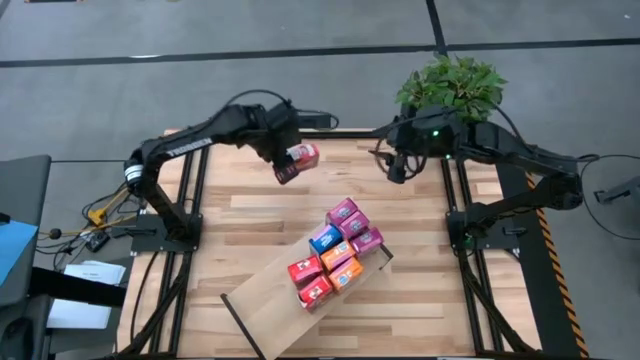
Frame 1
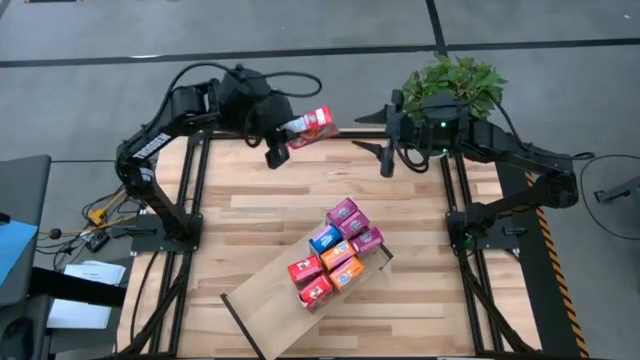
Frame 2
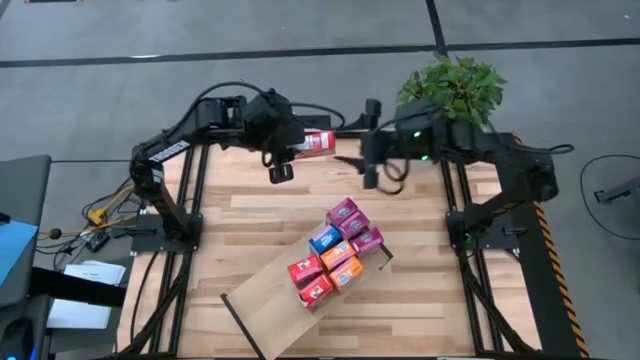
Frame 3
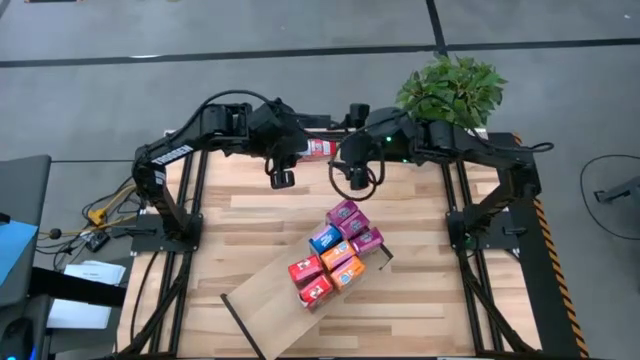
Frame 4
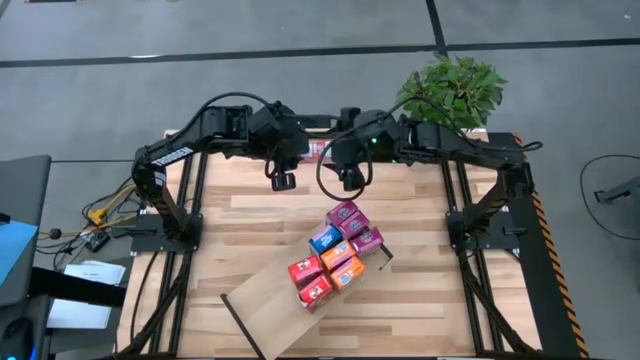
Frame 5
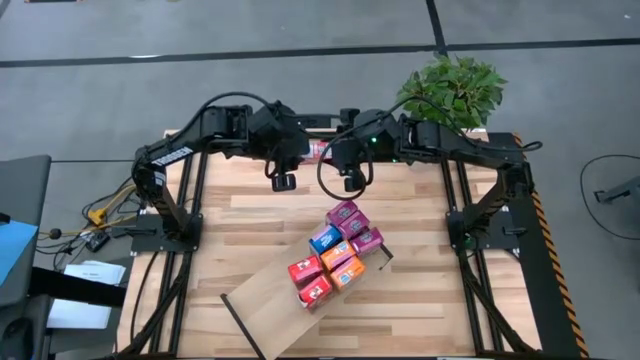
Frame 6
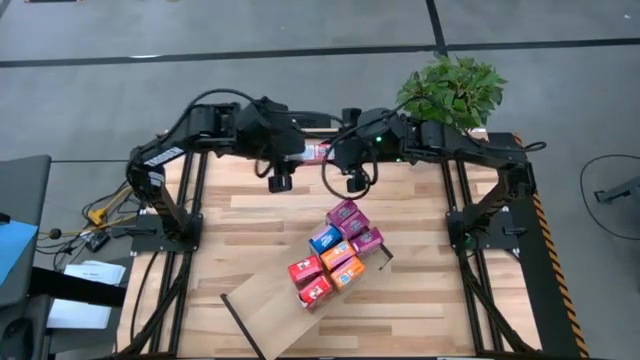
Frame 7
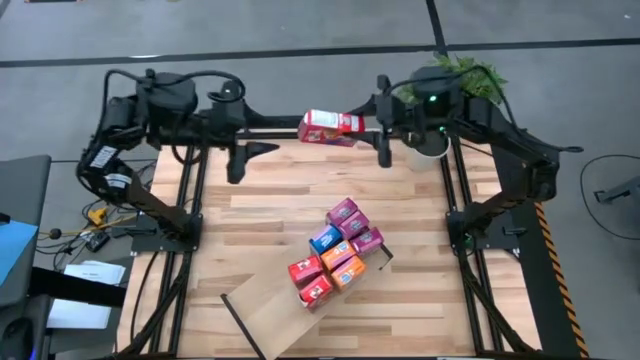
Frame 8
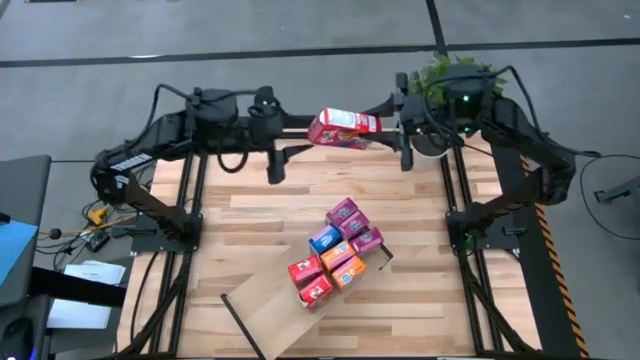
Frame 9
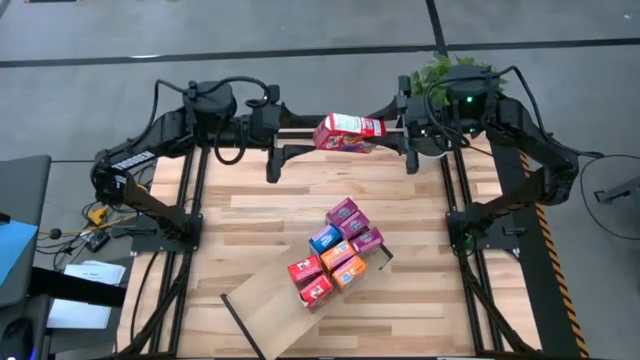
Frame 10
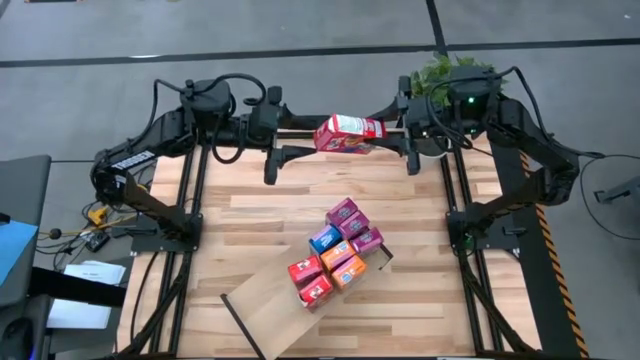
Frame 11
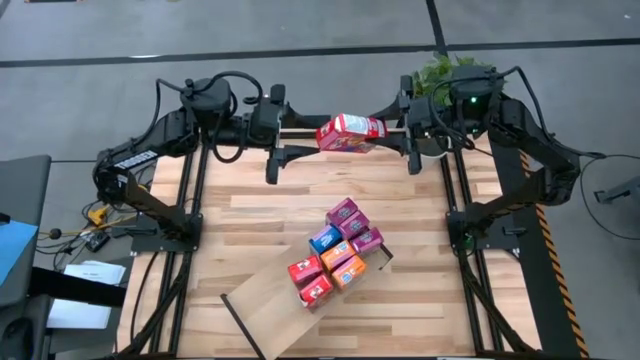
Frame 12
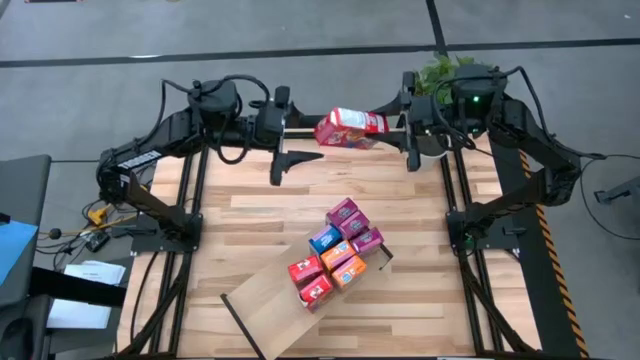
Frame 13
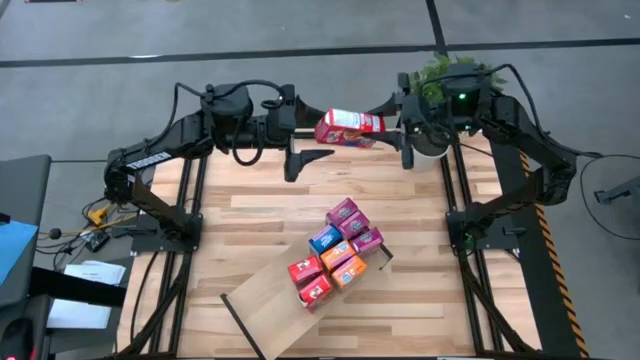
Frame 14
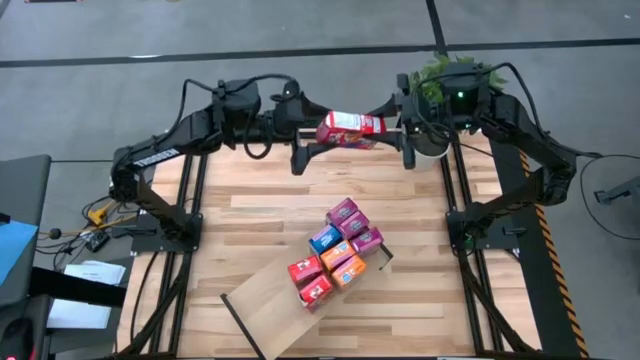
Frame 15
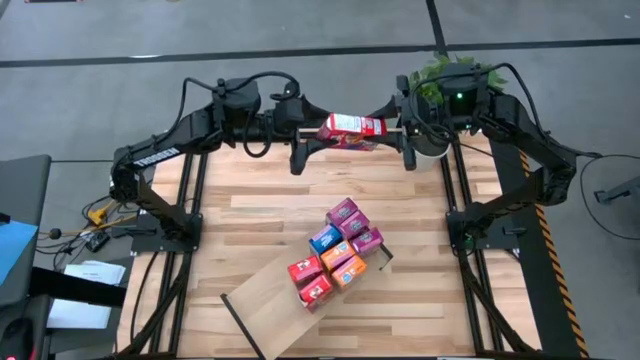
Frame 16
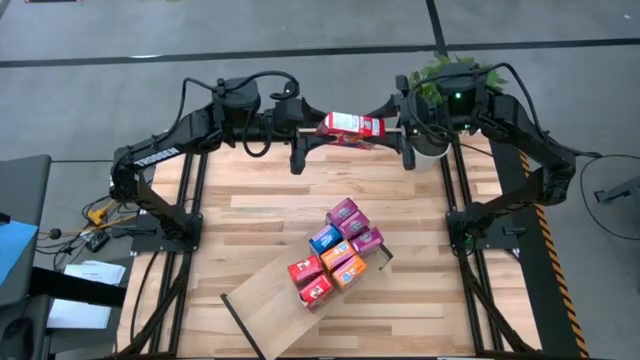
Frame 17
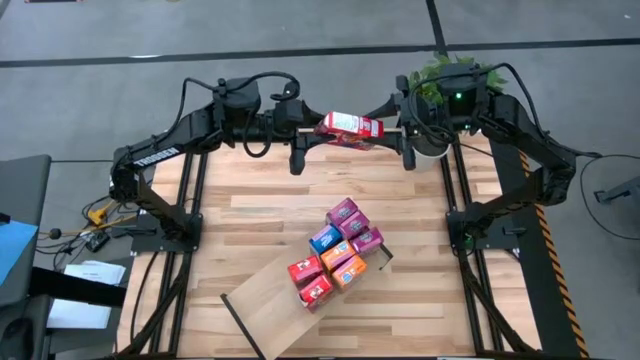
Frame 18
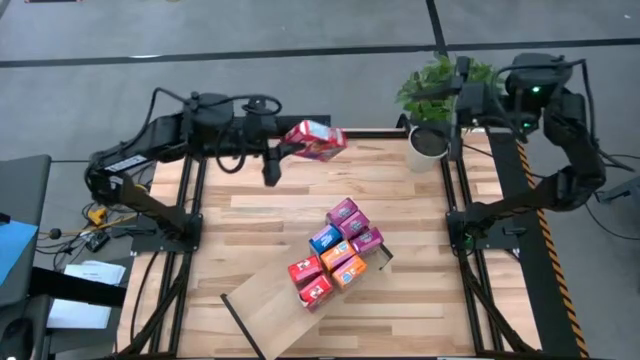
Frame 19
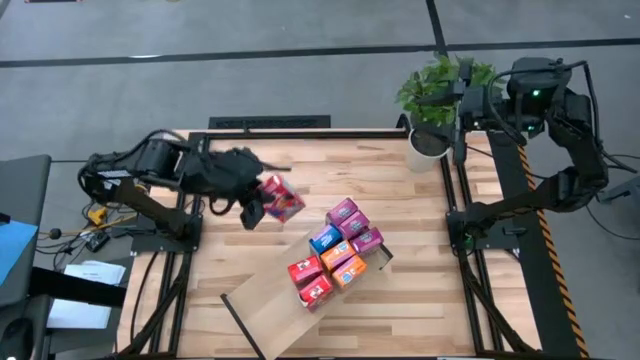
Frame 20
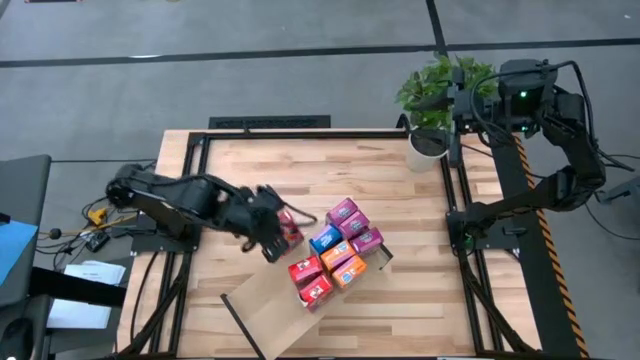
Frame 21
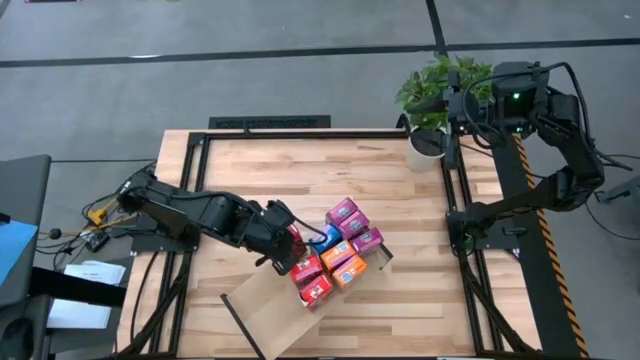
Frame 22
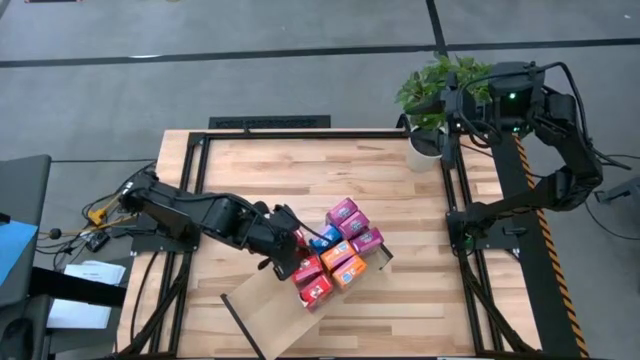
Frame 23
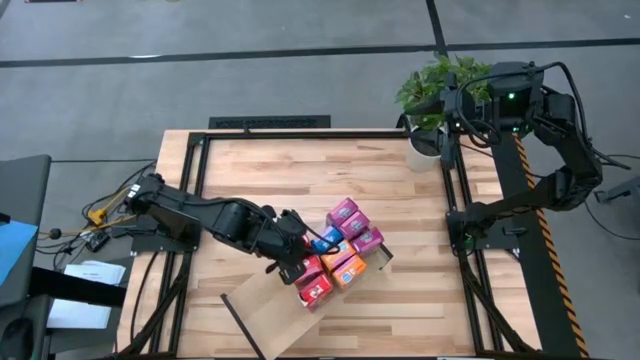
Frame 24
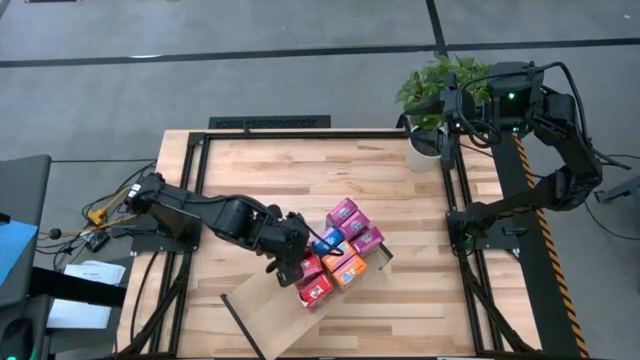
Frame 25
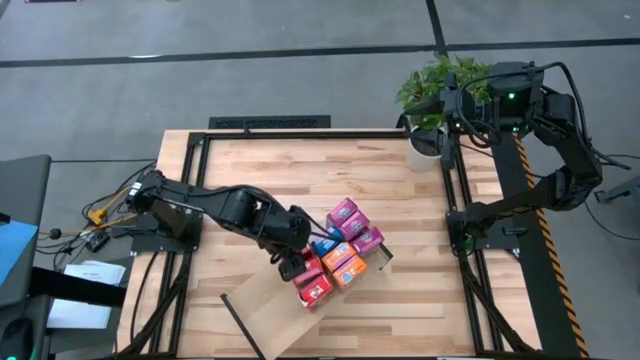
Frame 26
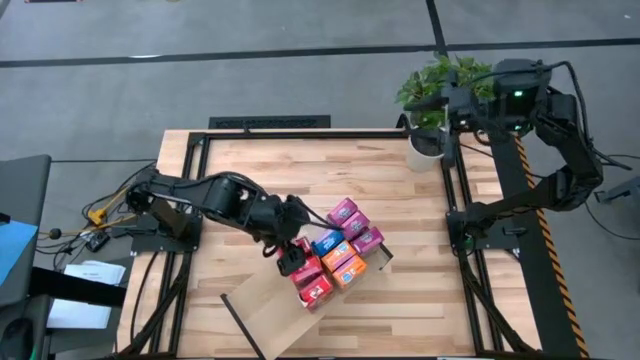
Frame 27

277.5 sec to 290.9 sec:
Task: Stack cereal on shelf
Put the red cereal box onto the shelf

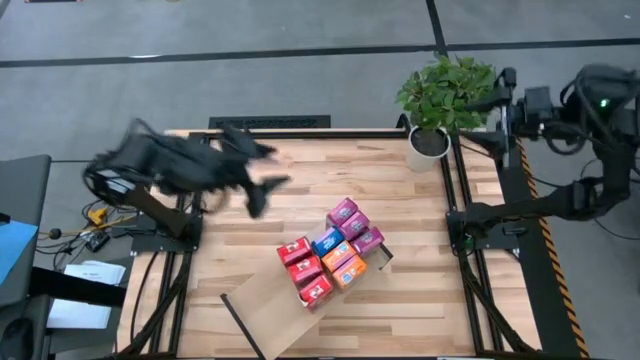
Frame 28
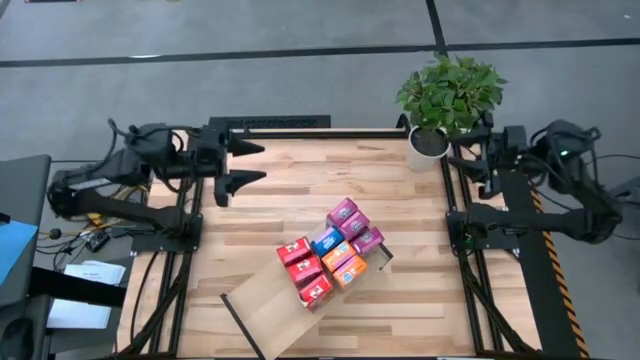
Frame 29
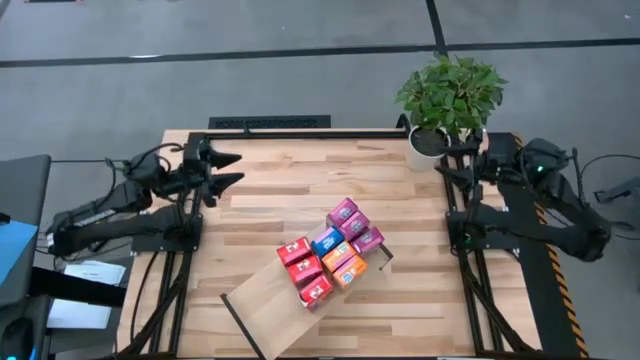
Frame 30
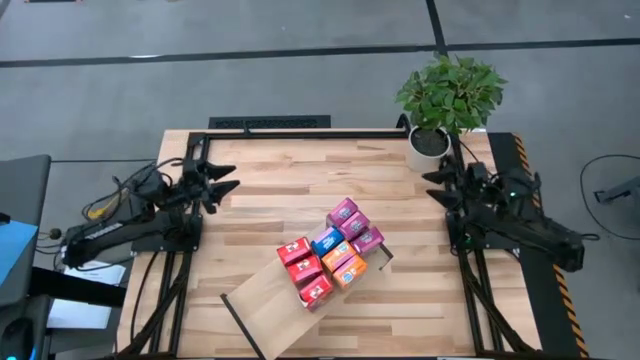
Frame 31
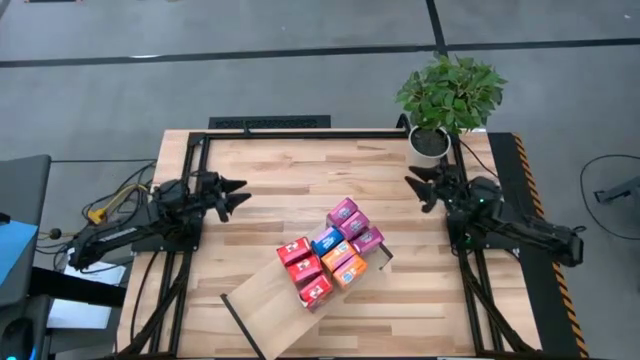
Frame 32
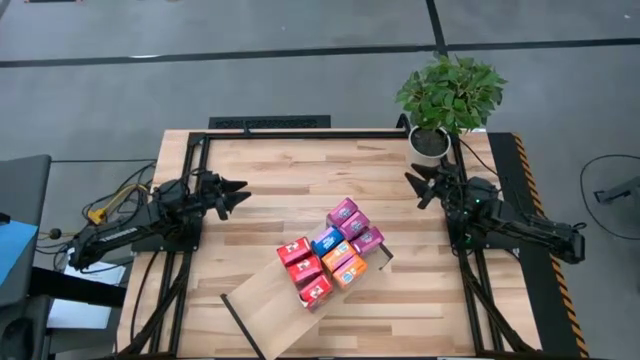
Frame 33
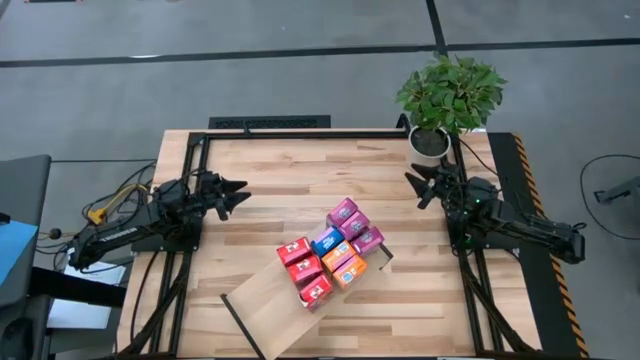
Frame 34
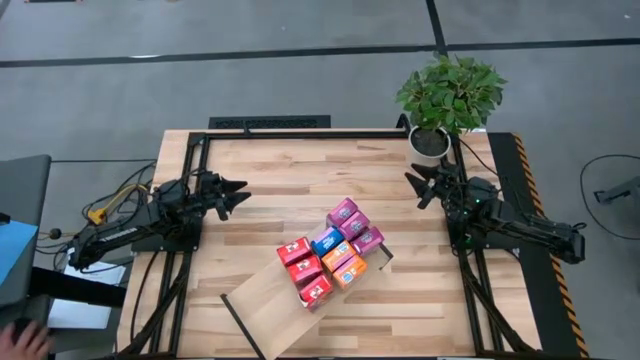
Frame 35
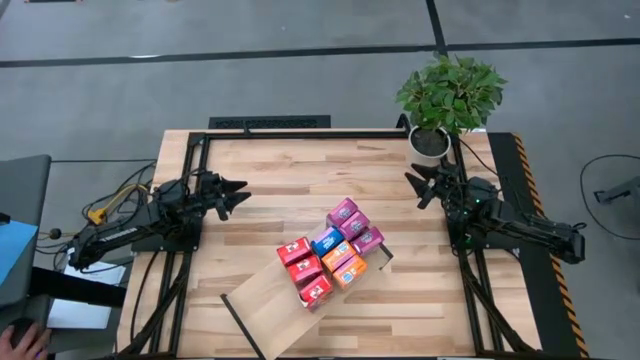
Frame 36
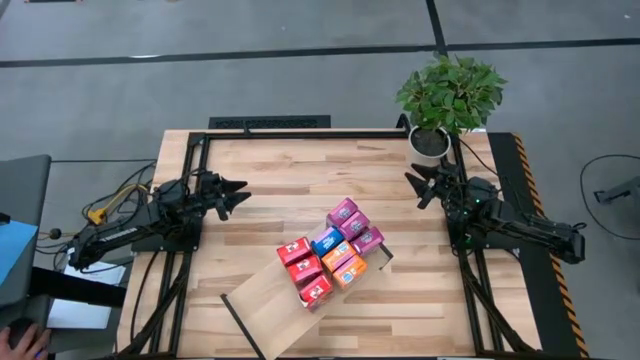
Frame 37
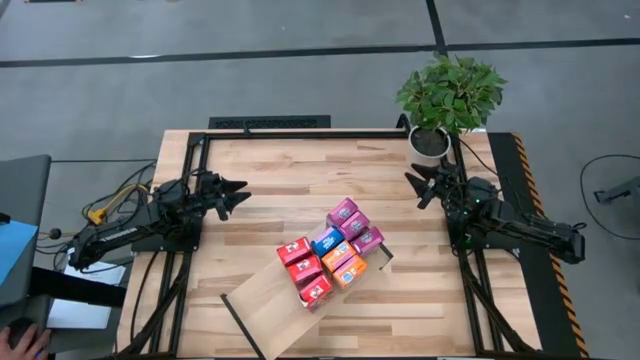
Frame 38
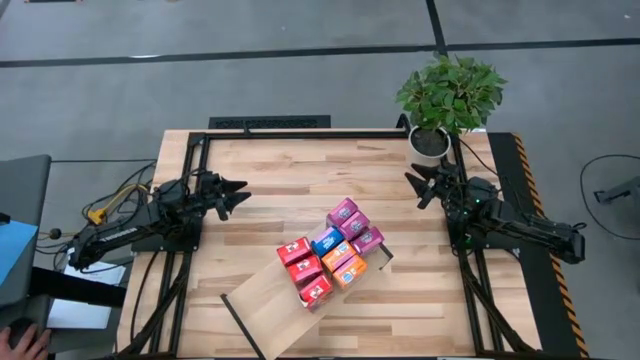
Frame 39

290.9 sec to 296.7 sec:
Return to home position
